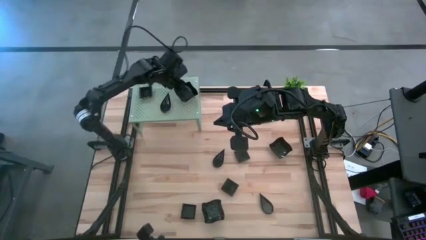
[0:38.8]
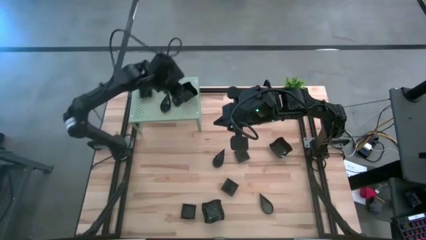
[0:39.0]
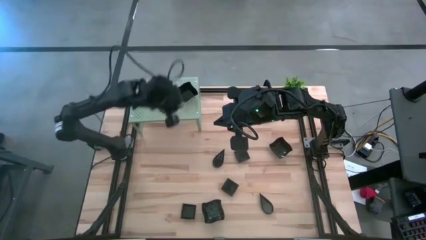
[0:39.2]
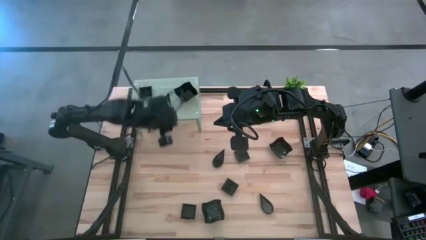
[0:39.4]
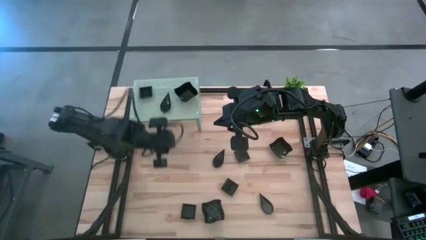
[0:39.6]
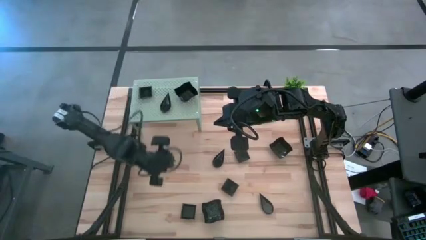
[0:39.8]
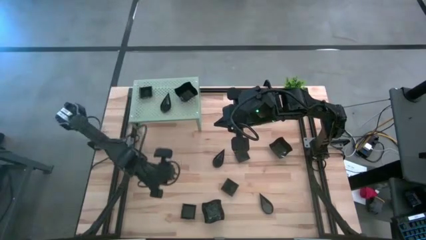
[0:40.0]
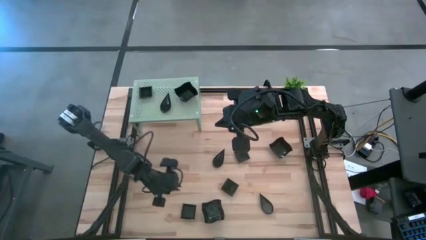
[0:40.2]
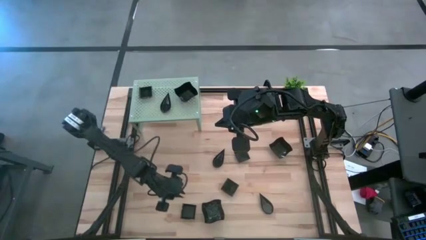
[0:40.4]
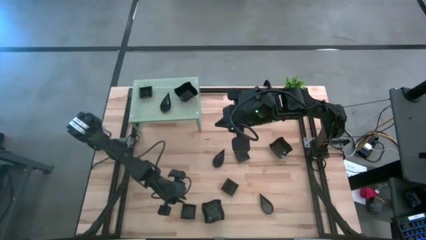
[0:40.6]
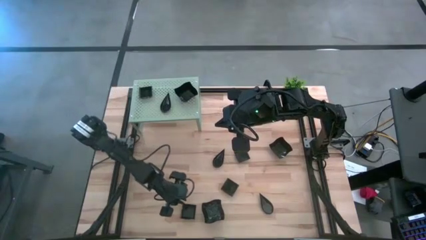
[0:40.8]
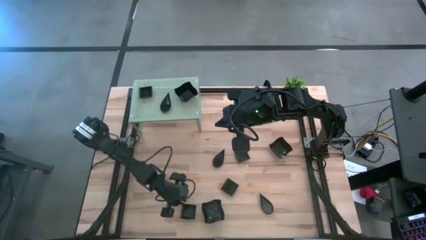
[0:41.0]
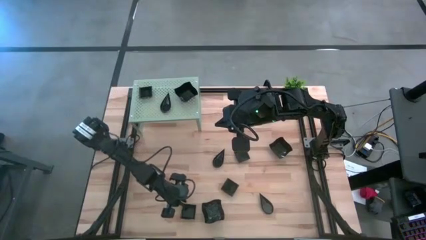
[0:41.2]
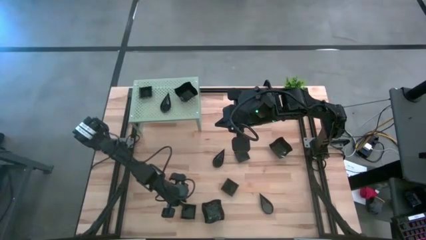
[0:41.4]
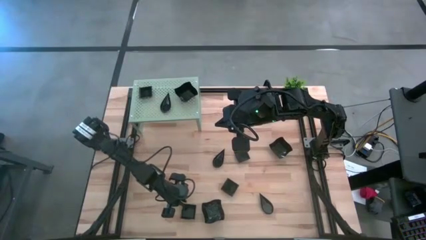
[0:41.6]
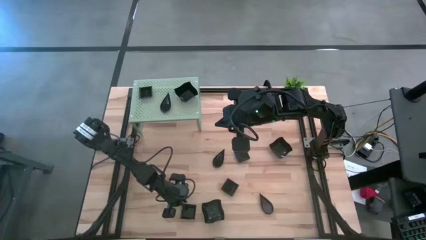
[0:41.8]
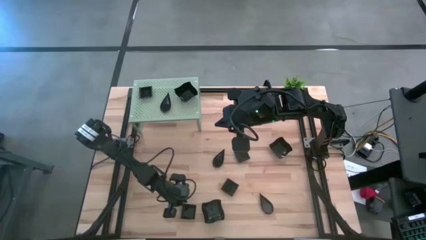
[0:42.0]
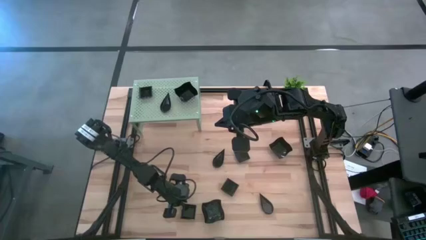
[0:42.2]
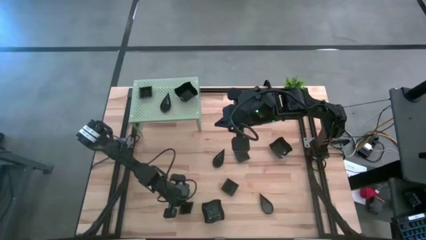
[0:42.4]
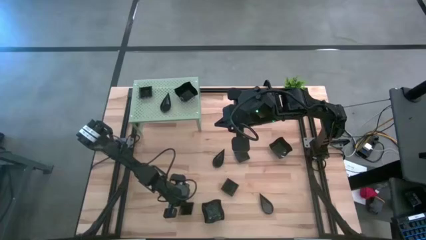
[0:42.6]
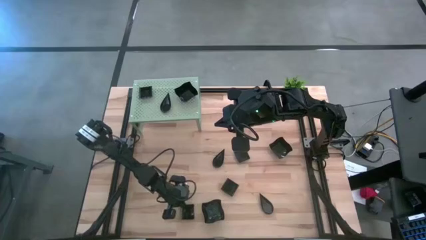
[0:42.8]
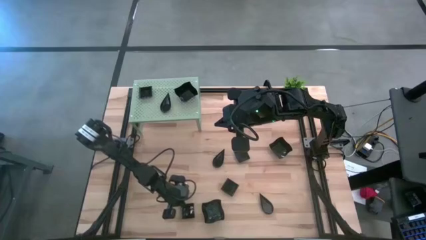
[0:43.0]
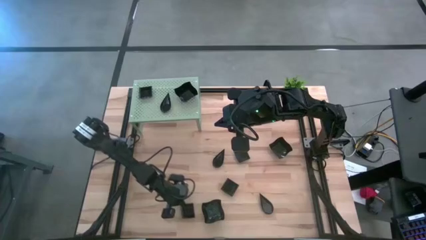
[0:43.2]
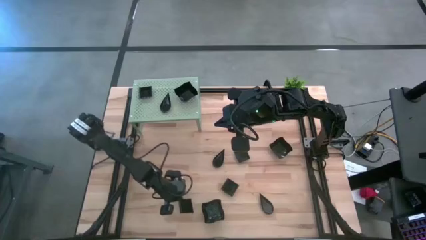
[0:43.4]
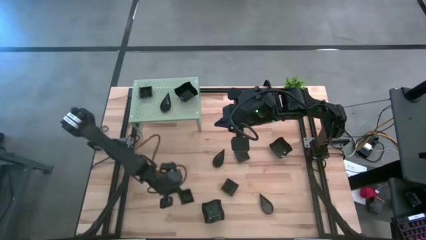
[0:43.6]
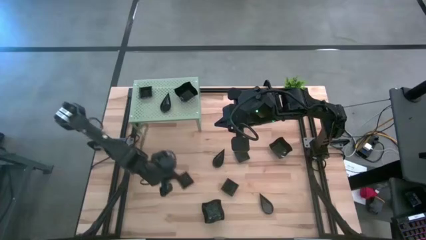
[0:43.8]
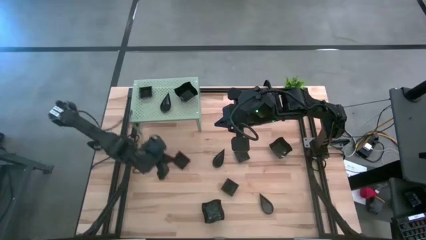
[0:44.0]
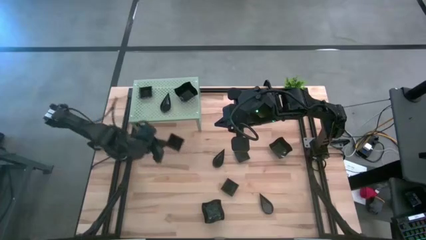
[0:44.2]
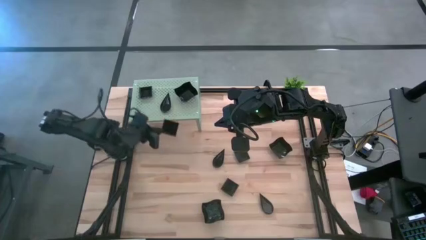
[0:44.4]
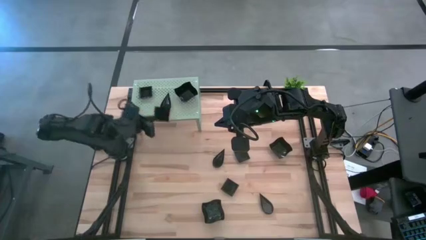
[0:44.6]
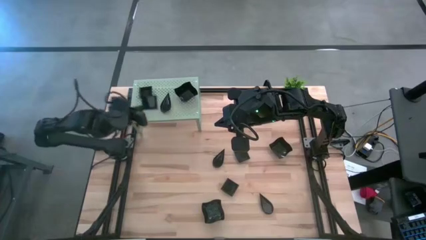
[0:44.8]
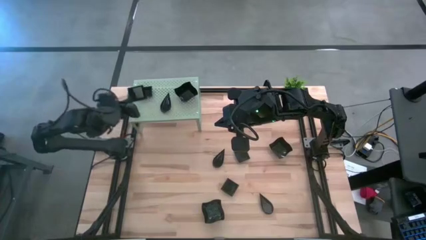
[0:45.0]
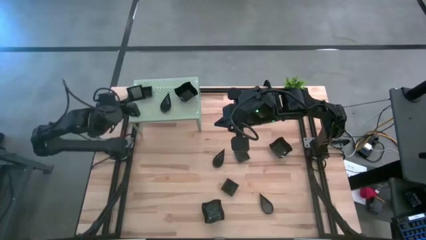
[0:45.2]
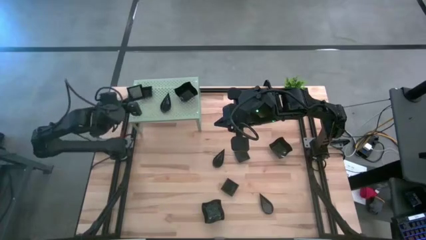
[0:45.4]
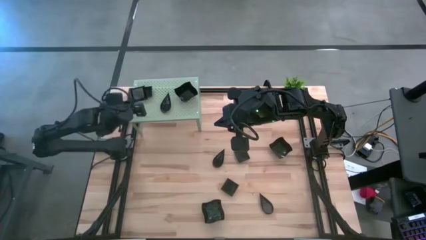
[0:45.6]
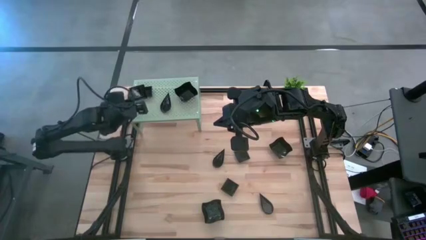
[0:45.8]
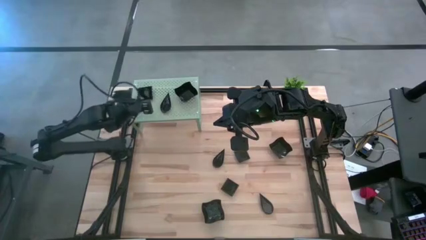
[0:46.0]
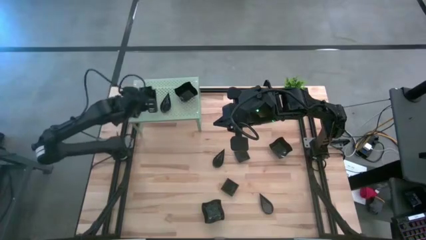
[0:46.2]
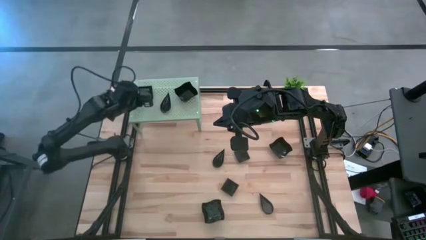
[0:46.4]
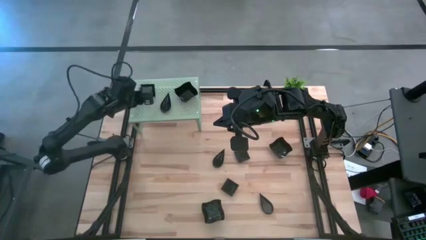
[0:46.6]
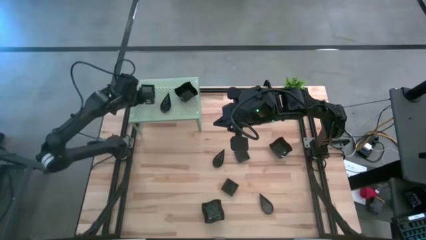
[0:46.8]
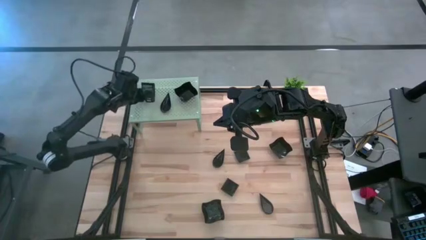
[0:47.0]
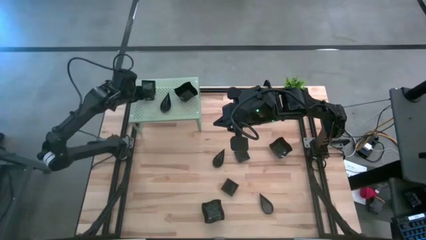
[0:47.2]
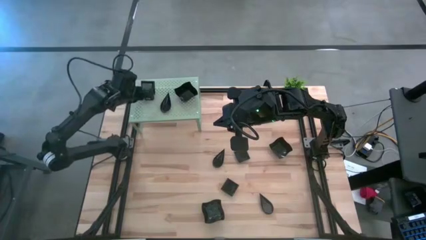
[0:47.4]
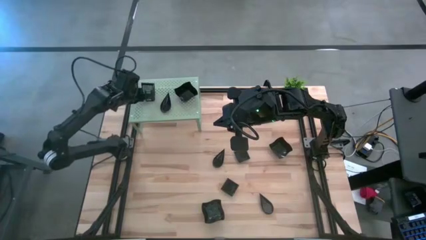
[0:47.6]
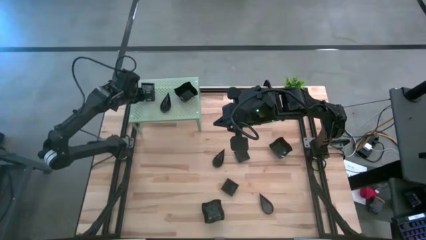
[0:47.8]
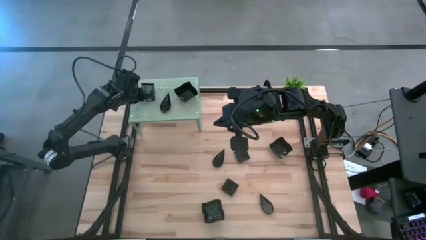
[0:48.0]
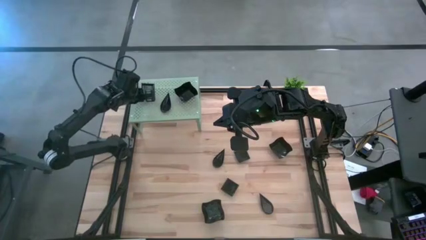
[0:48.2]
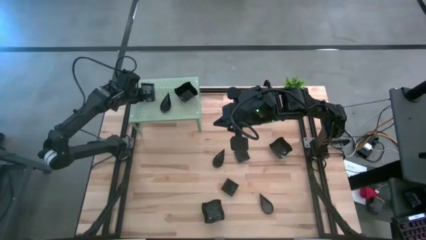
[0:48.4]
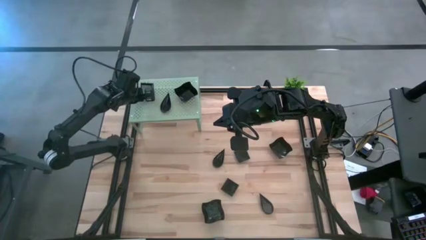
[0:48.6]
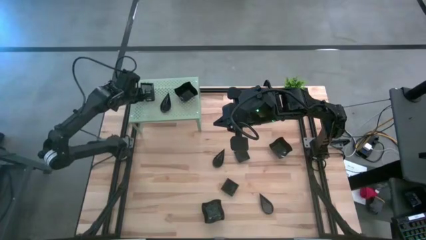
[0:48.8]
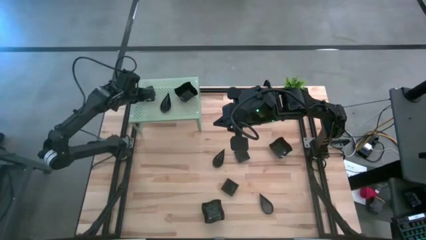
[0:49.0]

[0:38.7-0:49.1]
Task: Pick & Place Mini shaped plates
Stack the black square plate on top of the black square plate on the shelf
